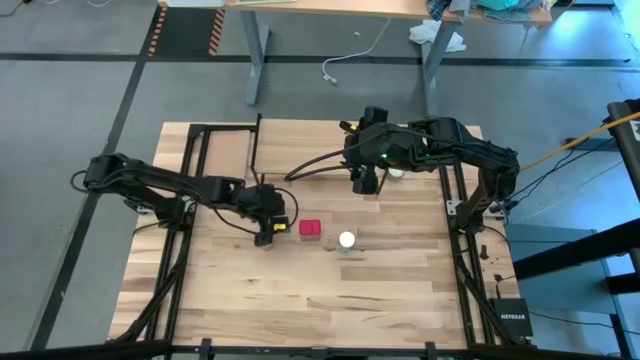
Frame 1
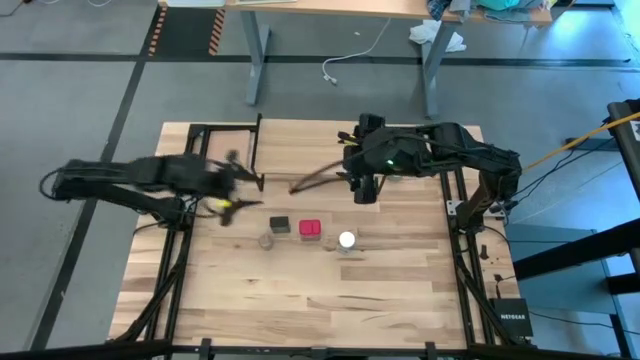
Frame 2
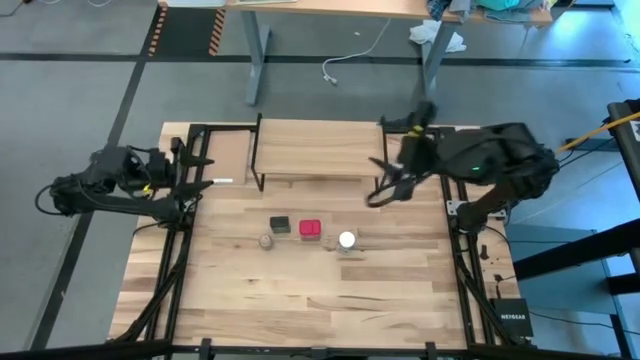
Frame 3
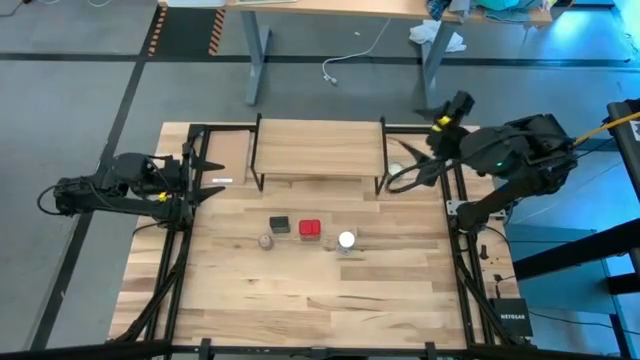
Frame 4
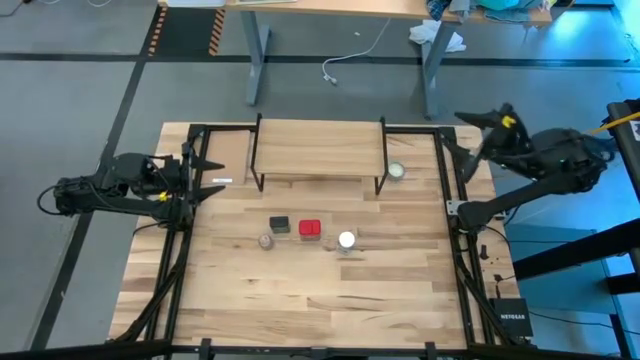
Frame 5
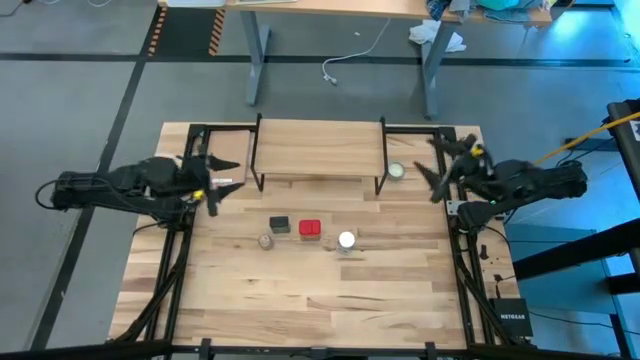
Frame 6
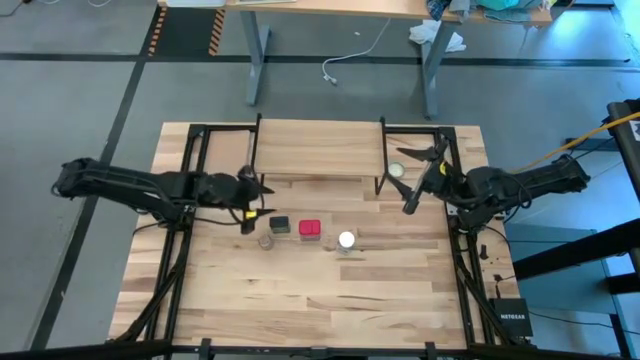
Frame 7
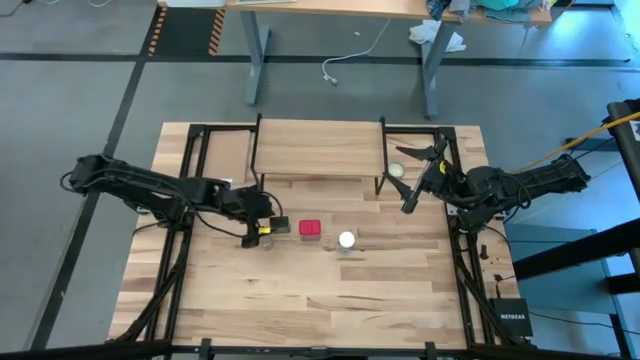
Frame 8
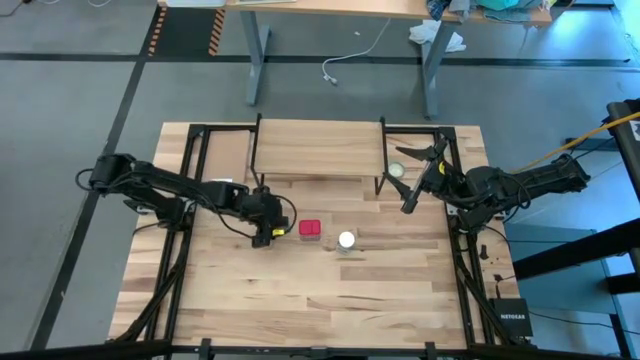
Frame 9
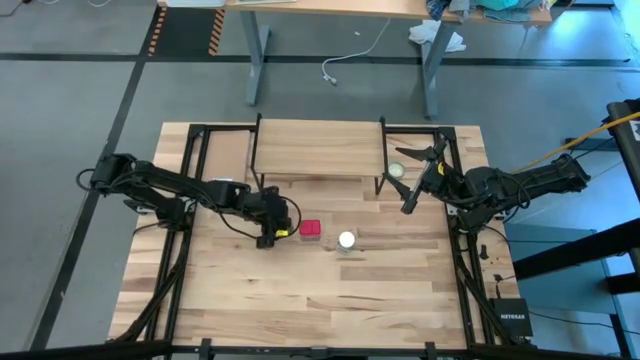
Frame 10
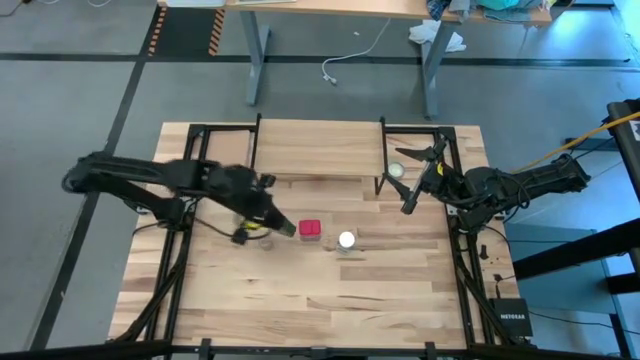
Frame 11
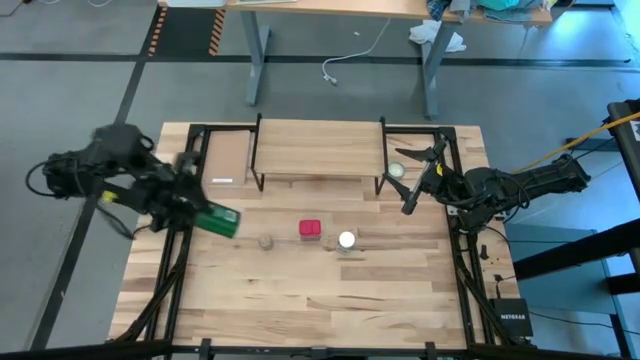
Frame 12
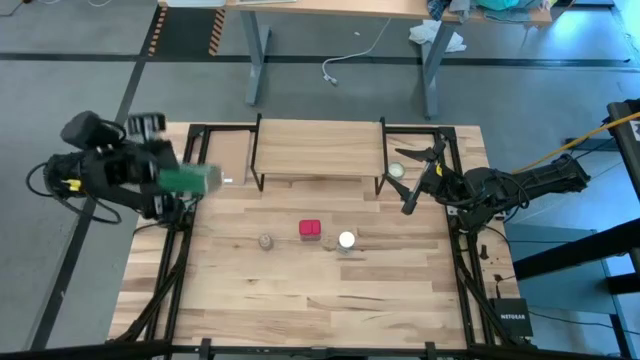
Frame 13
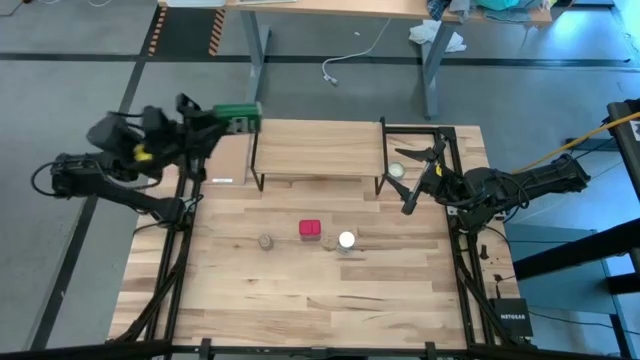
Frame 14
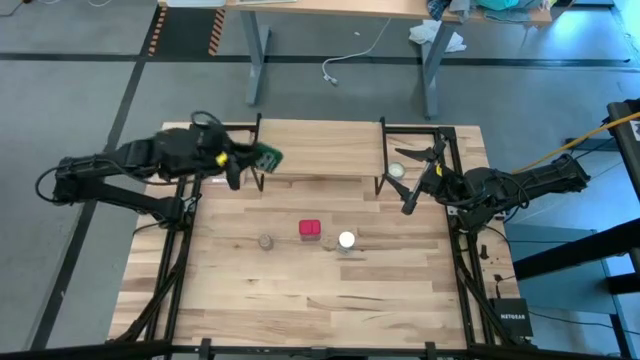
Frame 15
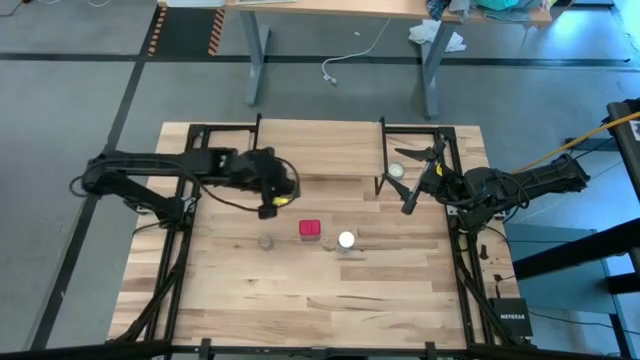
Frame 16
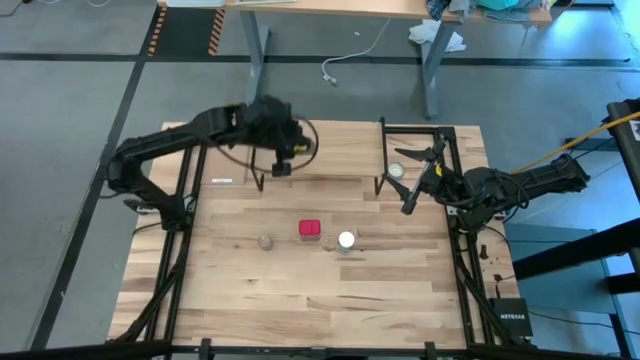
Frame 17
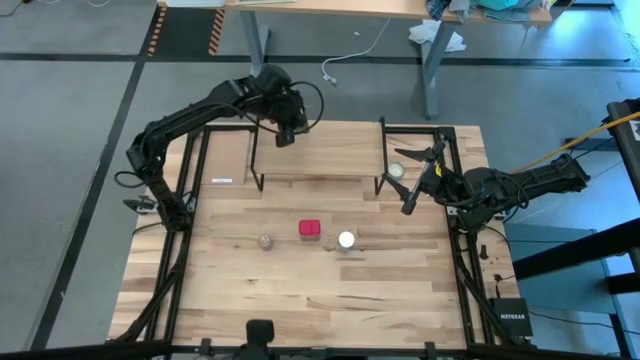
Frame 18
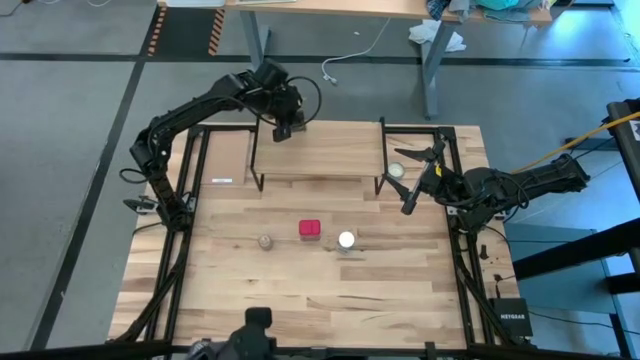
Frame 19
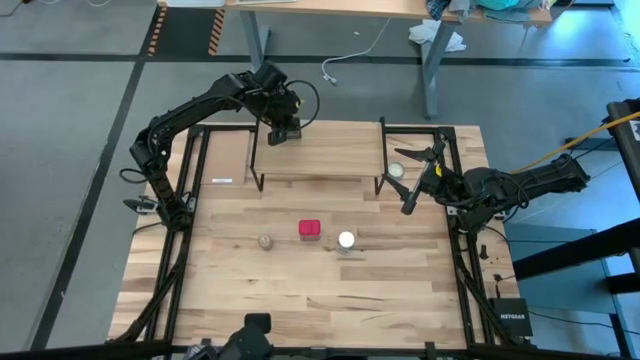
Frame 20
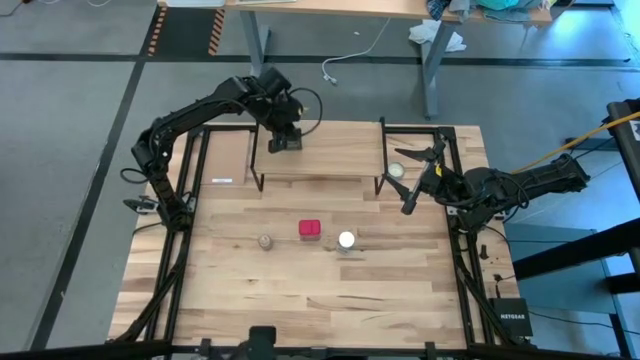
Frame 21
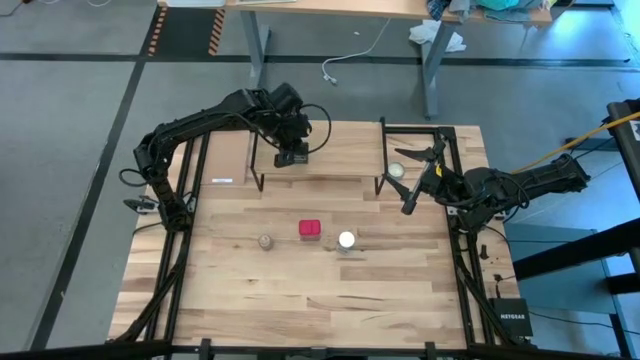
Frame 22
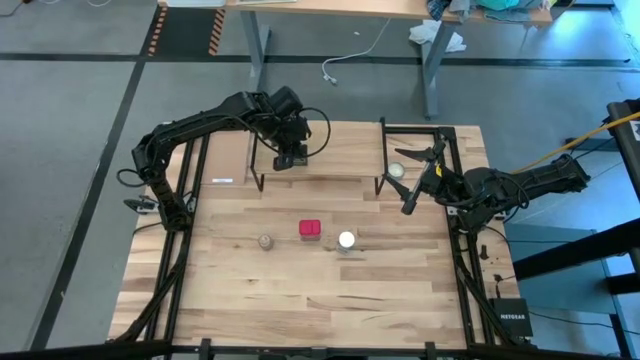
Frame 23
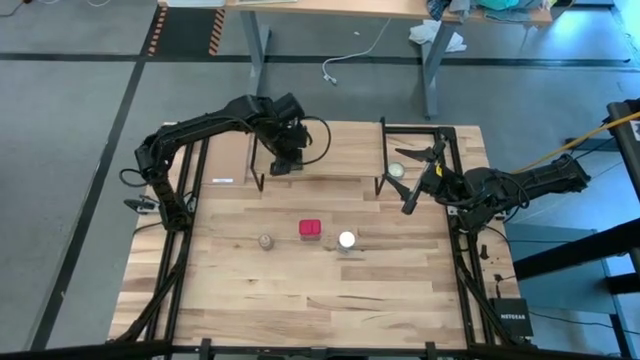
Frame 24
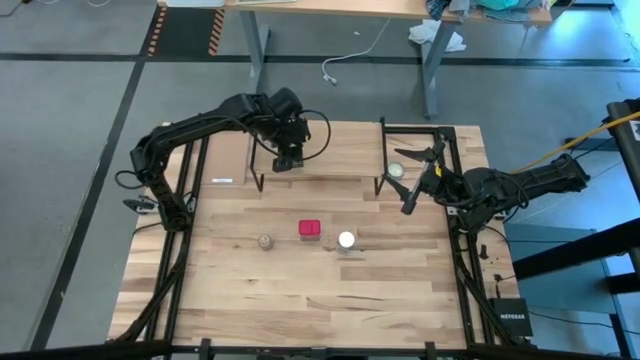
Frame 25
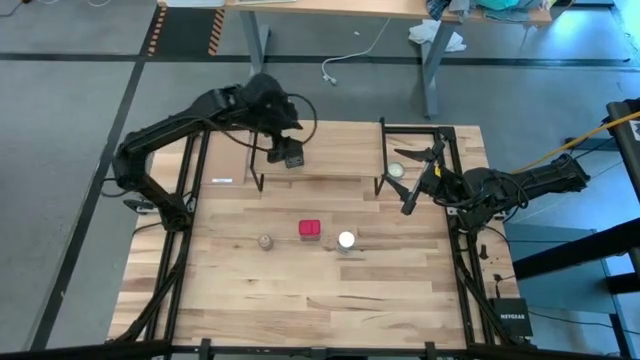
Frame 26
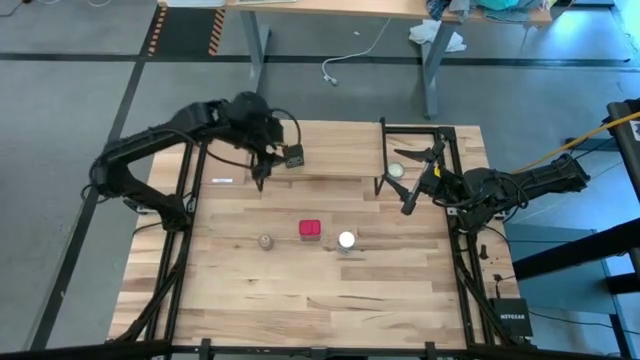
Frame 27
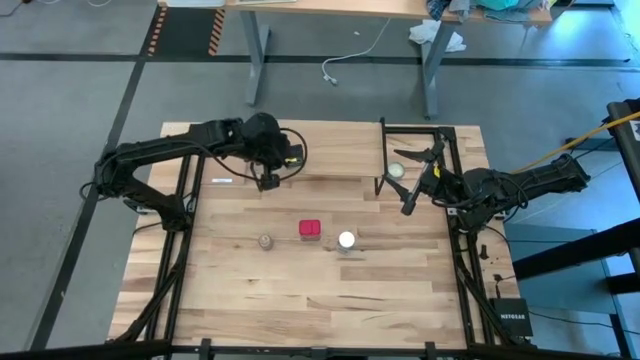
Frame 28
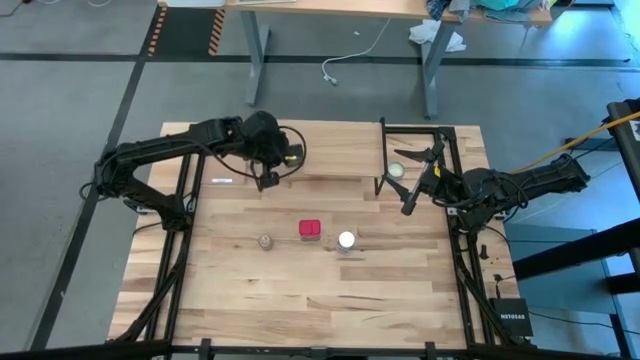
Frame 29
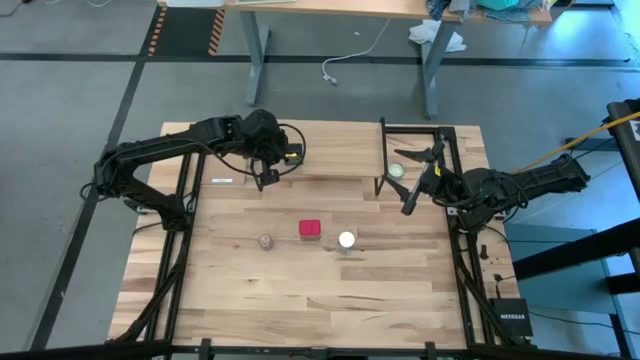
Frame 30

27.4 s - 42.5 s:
Task: Shelf spices
Put the black seasoning can on the shelf

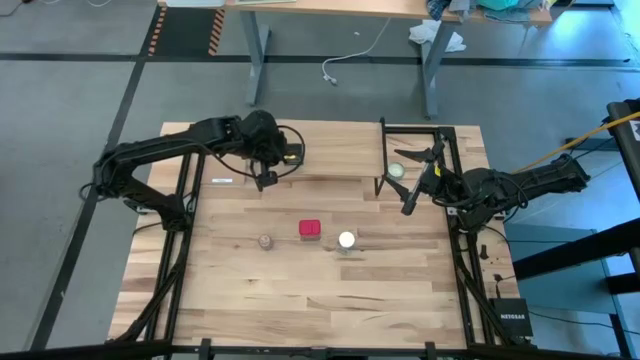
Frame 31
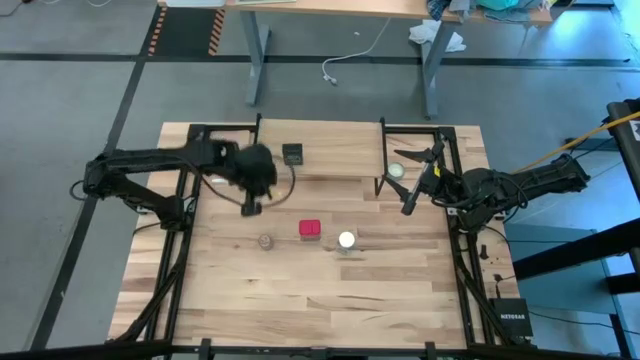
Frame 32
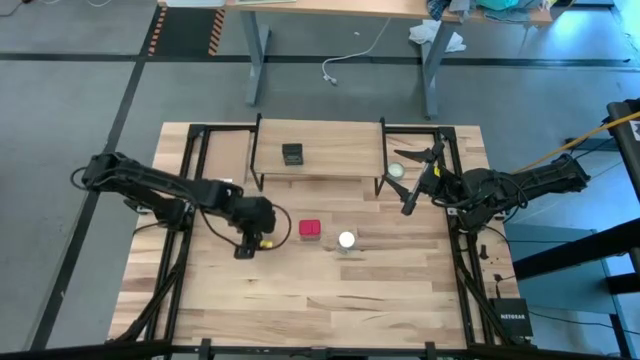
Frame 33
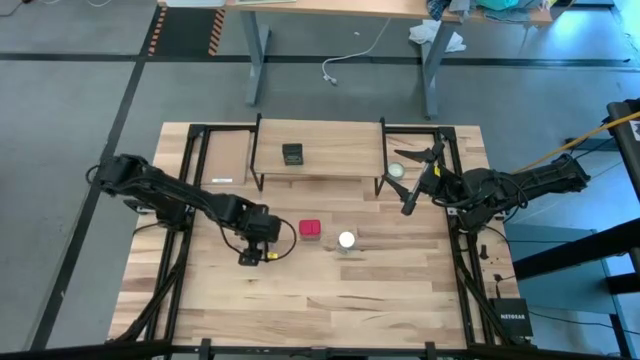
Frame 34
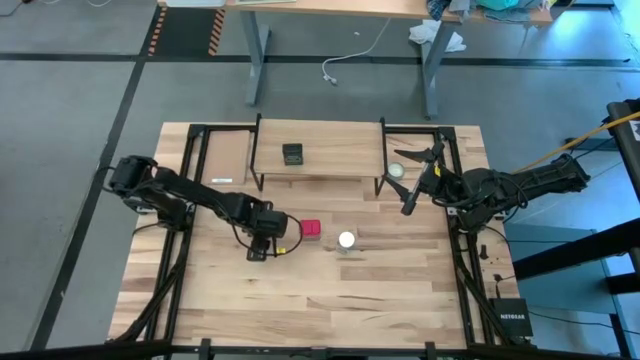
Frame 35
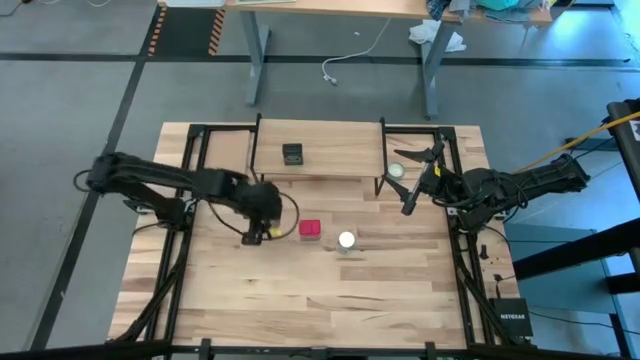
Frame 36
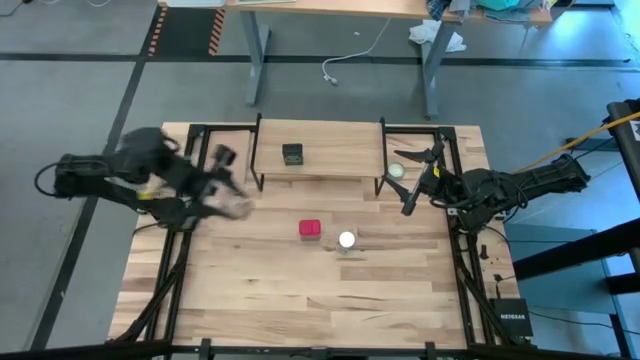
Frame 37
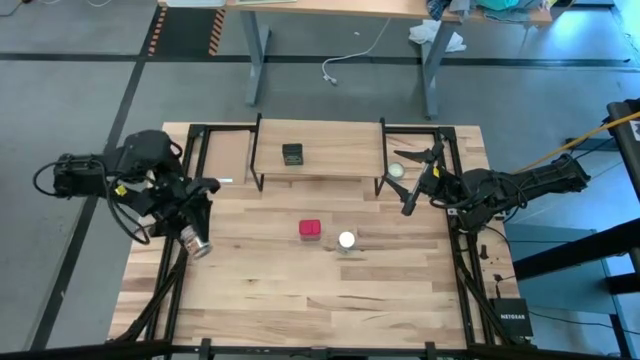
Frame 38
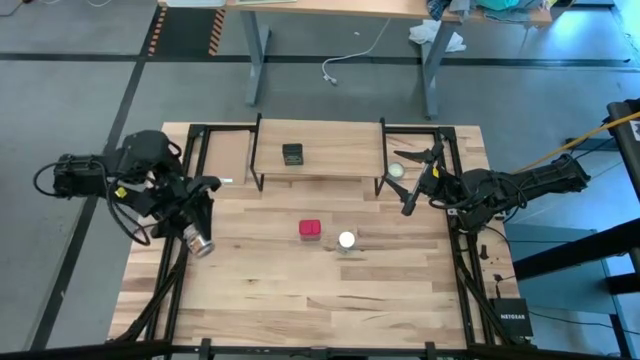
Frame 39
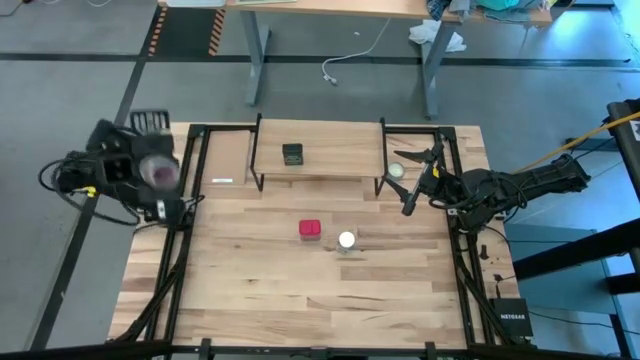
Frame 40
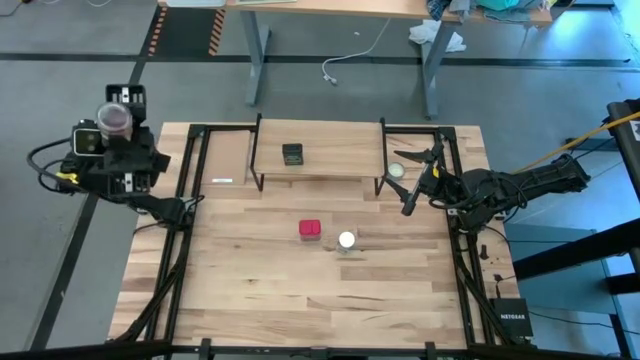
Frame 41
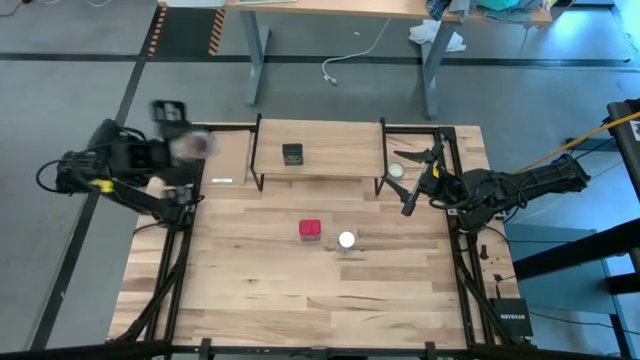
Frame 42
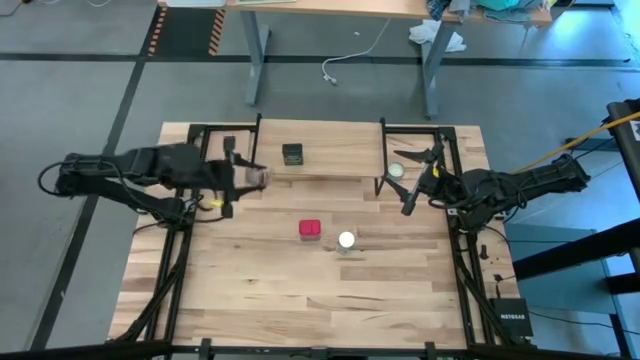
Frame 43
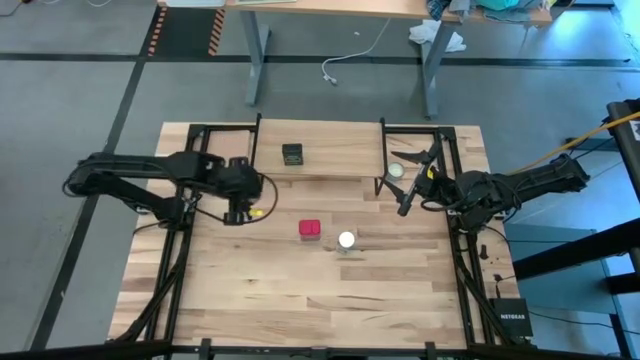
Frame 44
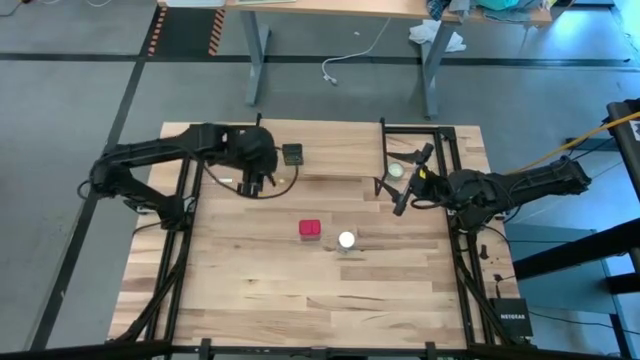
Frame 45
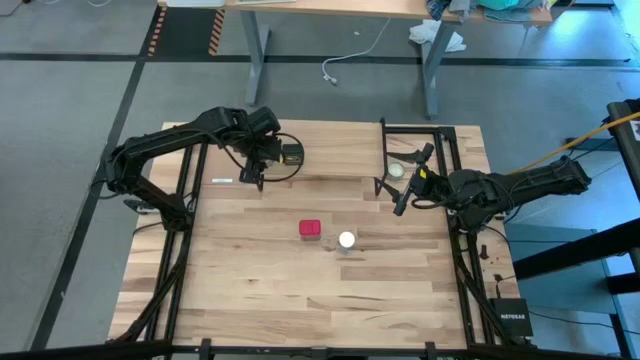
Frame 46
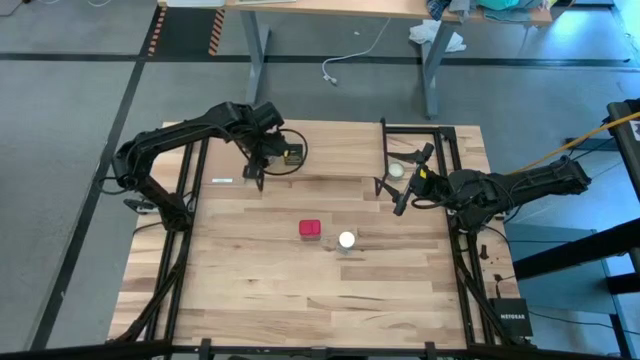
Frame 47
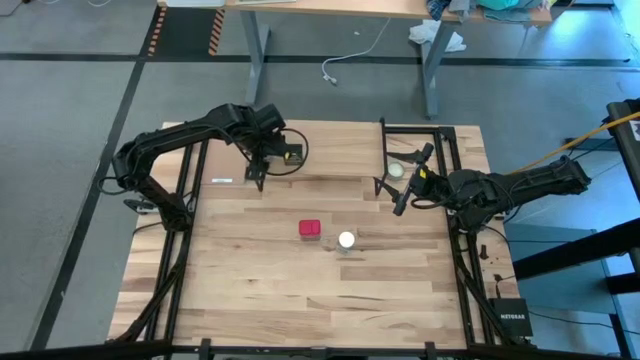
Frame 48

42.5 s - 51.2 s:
Put the transparent seasoning bottle on the shelf
